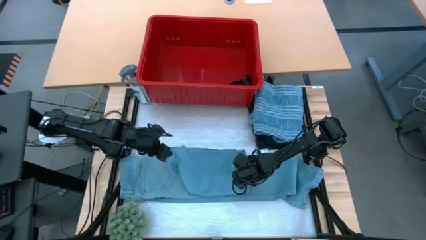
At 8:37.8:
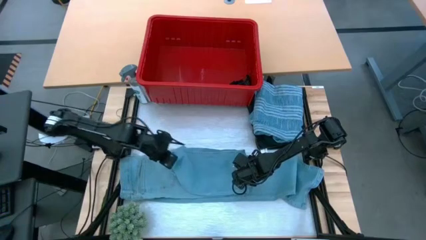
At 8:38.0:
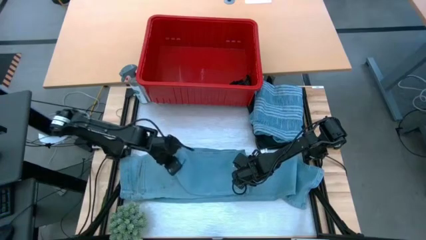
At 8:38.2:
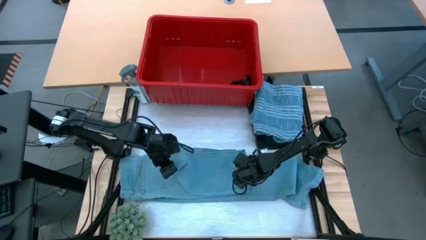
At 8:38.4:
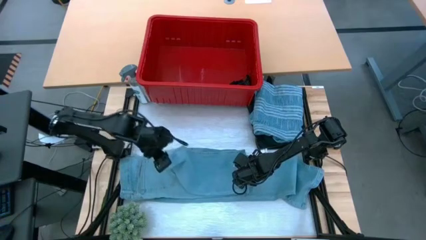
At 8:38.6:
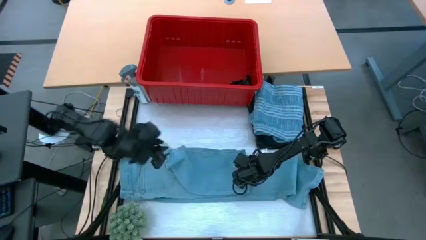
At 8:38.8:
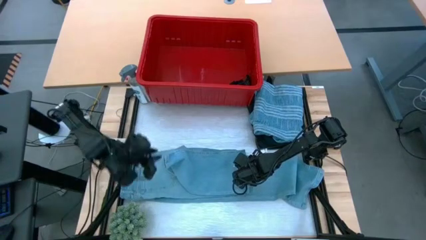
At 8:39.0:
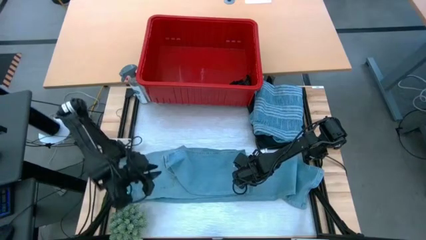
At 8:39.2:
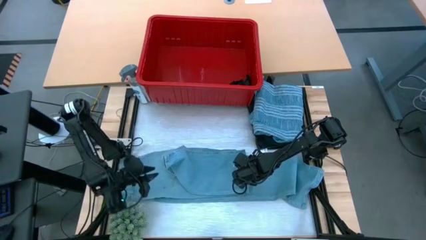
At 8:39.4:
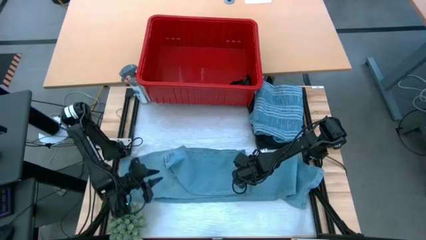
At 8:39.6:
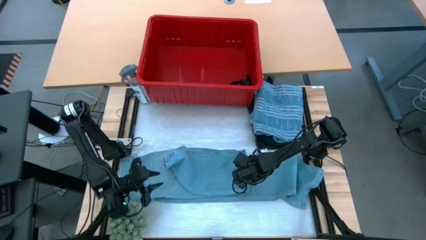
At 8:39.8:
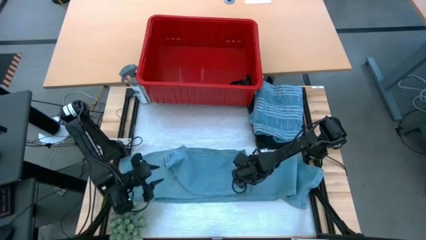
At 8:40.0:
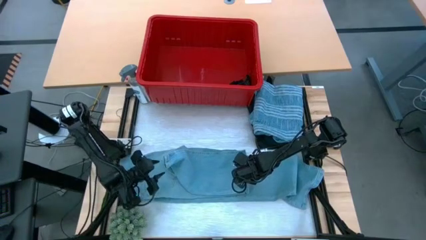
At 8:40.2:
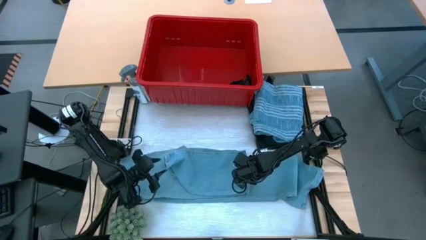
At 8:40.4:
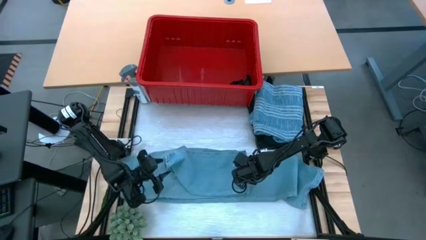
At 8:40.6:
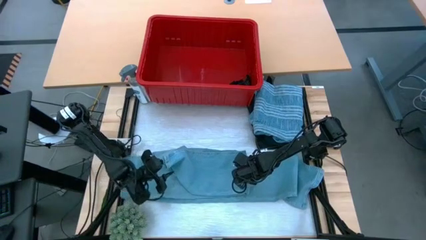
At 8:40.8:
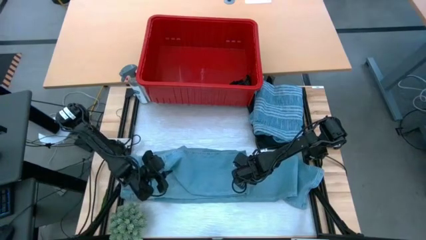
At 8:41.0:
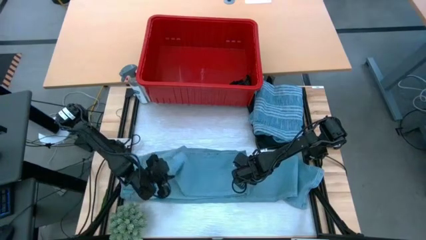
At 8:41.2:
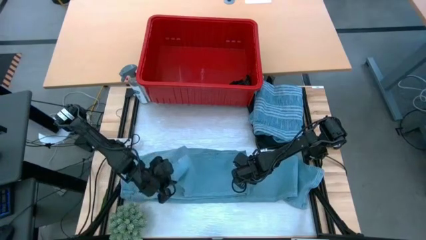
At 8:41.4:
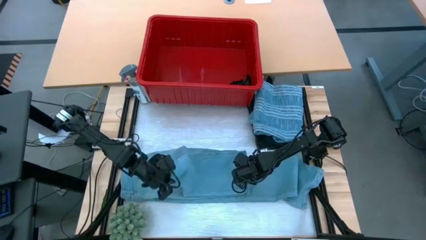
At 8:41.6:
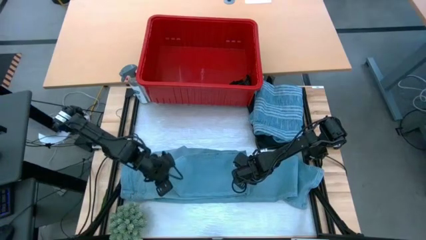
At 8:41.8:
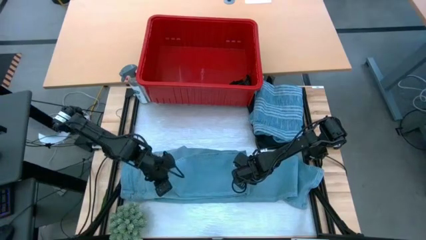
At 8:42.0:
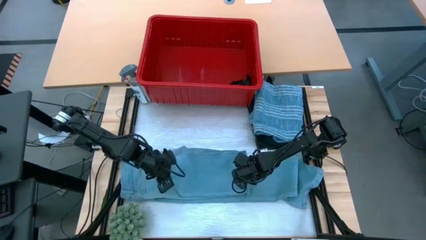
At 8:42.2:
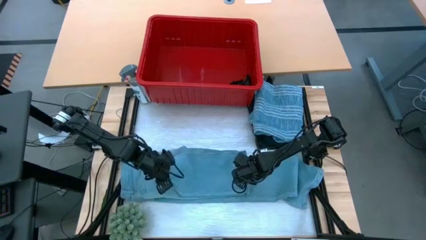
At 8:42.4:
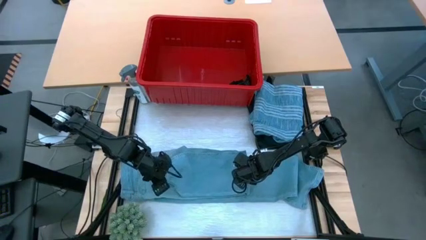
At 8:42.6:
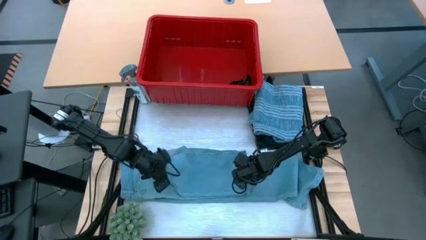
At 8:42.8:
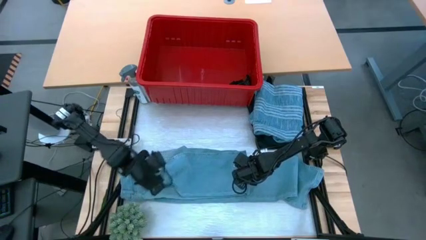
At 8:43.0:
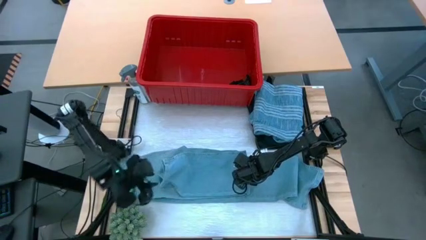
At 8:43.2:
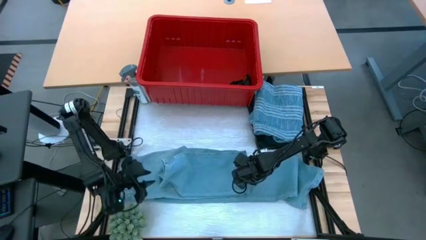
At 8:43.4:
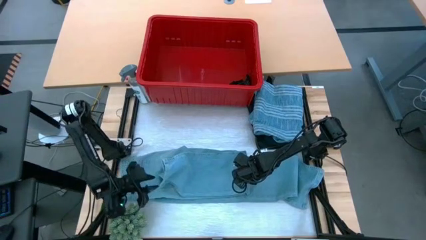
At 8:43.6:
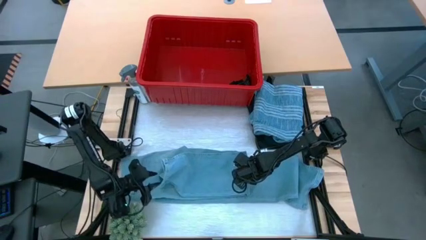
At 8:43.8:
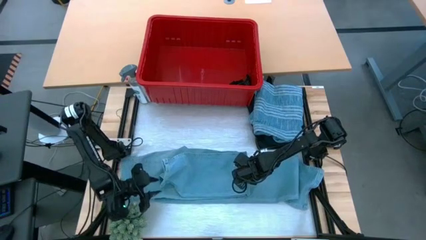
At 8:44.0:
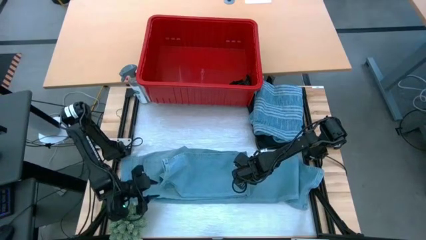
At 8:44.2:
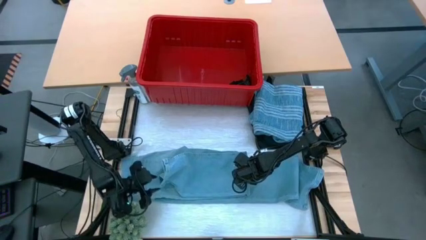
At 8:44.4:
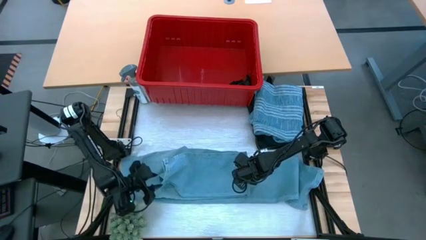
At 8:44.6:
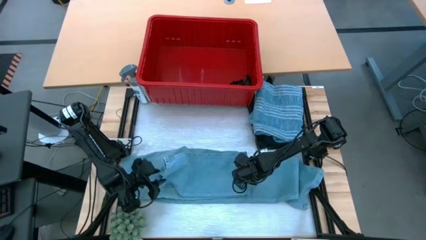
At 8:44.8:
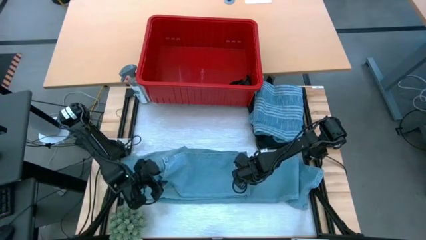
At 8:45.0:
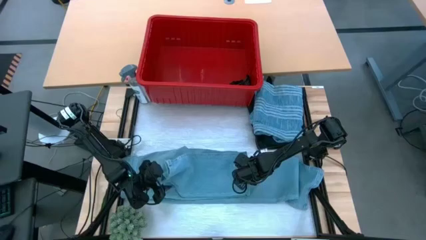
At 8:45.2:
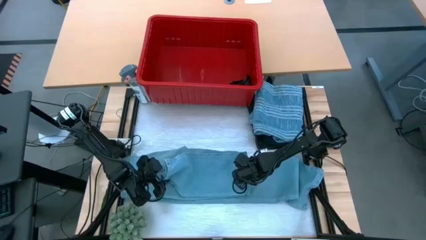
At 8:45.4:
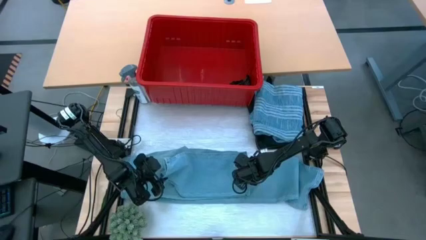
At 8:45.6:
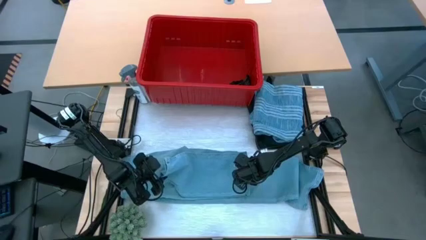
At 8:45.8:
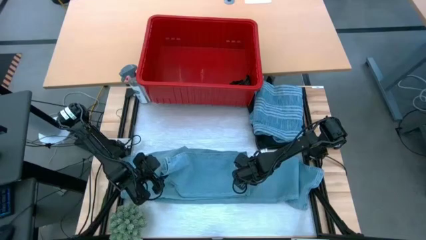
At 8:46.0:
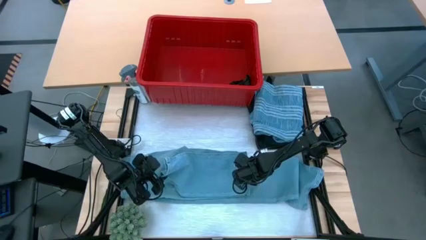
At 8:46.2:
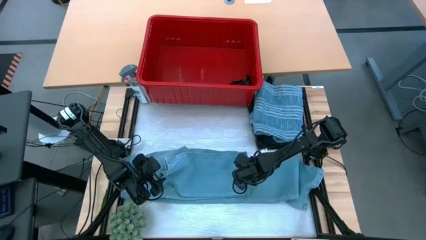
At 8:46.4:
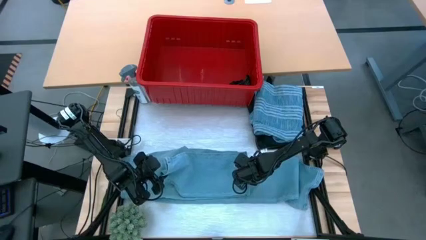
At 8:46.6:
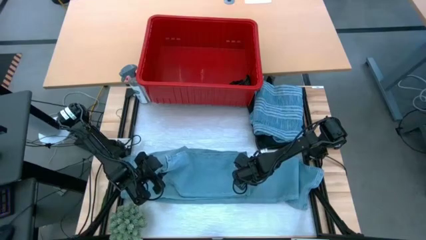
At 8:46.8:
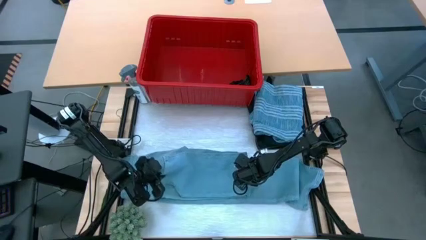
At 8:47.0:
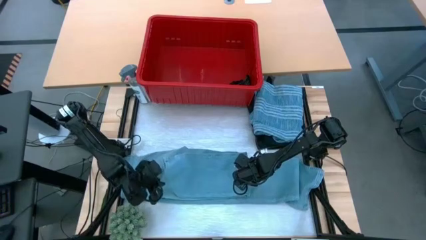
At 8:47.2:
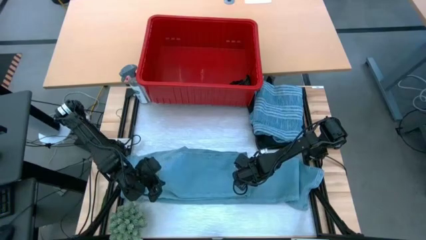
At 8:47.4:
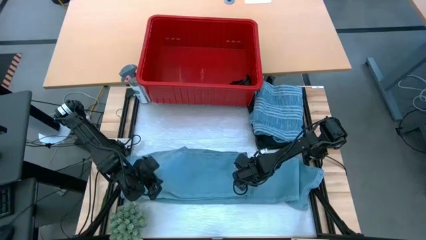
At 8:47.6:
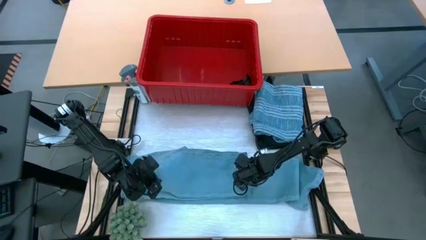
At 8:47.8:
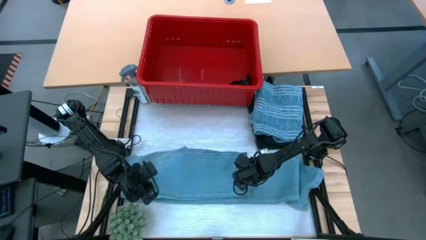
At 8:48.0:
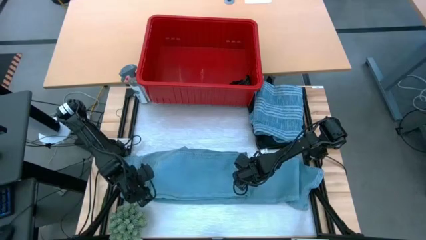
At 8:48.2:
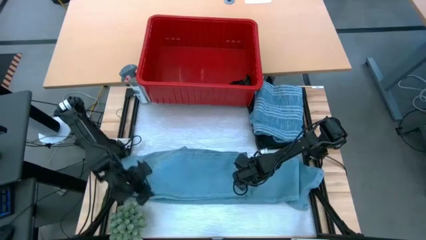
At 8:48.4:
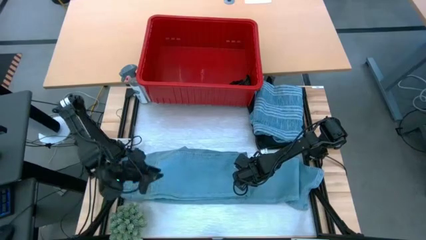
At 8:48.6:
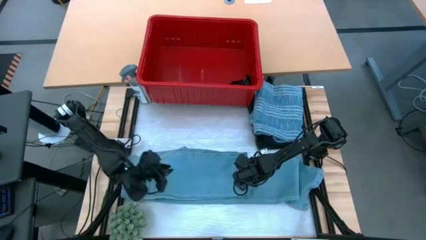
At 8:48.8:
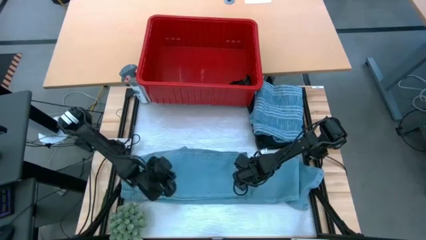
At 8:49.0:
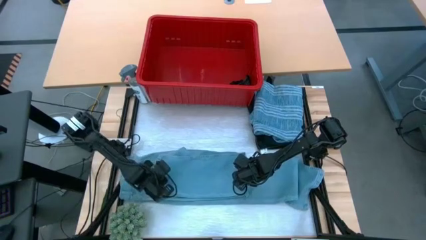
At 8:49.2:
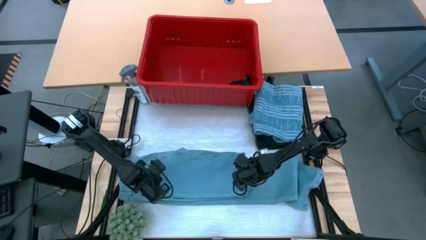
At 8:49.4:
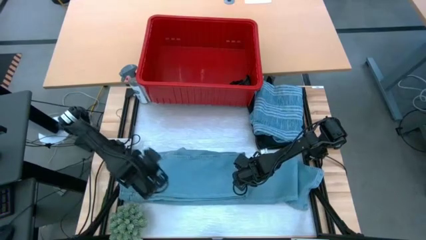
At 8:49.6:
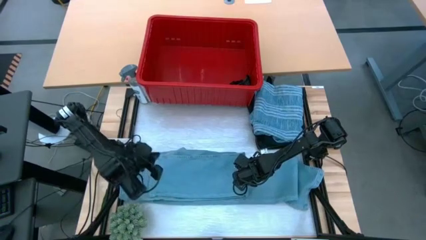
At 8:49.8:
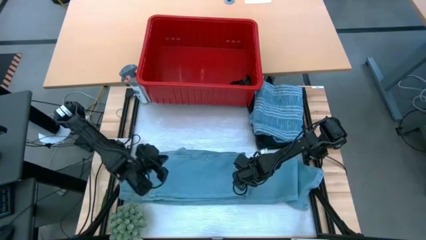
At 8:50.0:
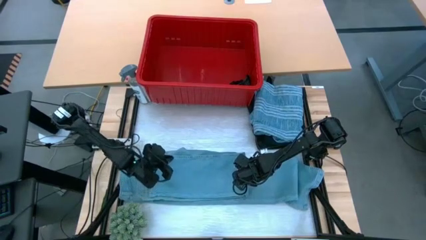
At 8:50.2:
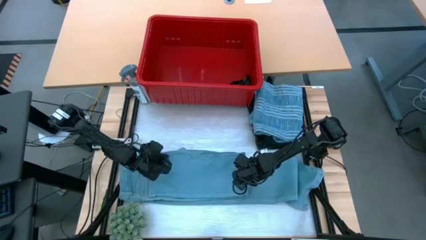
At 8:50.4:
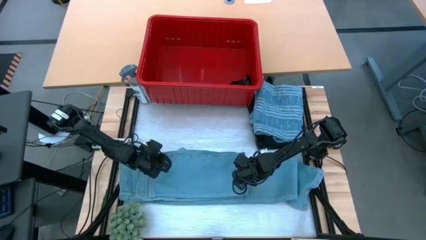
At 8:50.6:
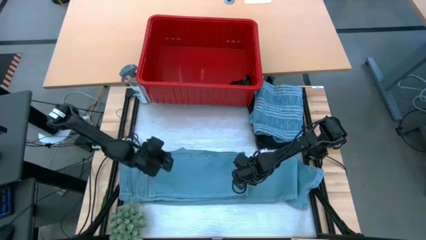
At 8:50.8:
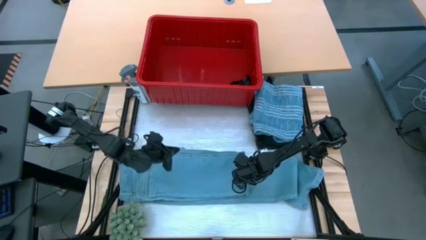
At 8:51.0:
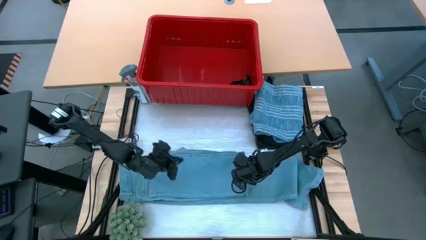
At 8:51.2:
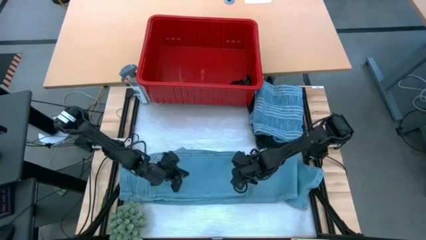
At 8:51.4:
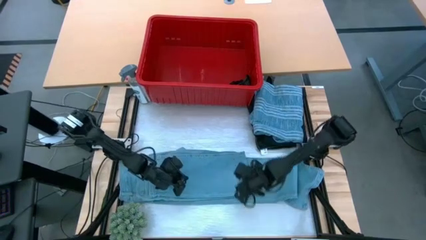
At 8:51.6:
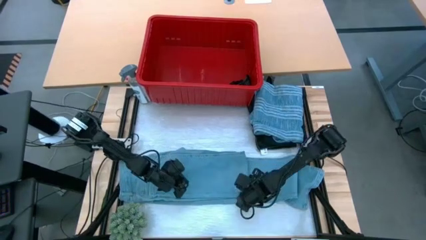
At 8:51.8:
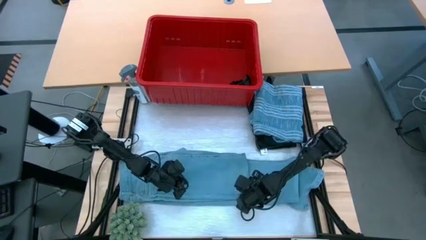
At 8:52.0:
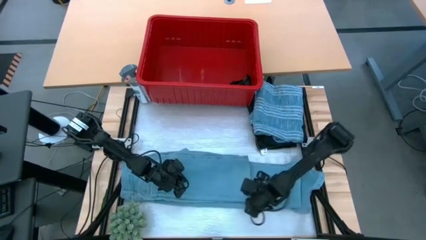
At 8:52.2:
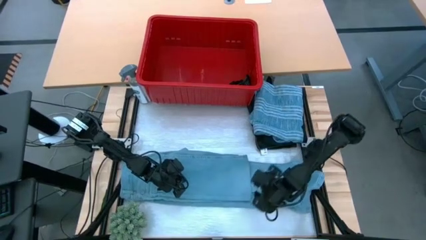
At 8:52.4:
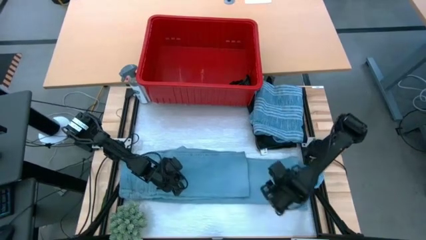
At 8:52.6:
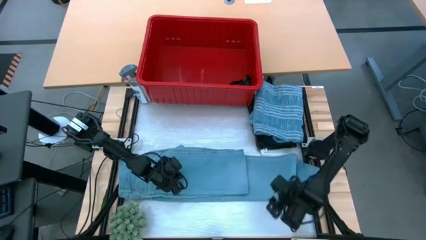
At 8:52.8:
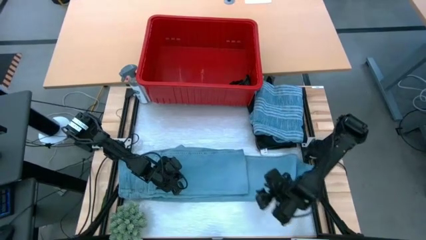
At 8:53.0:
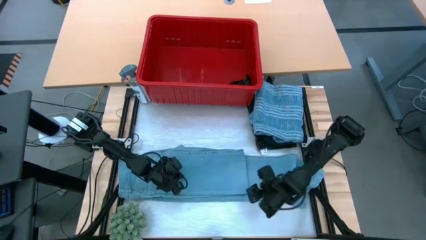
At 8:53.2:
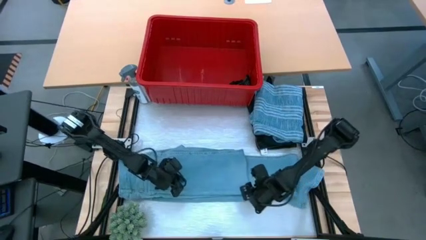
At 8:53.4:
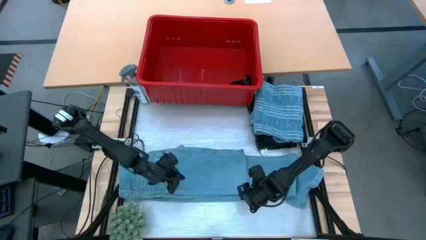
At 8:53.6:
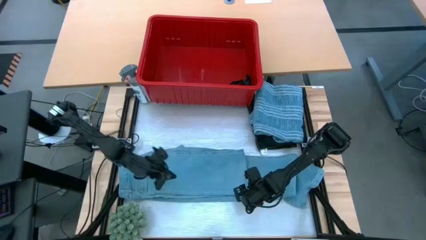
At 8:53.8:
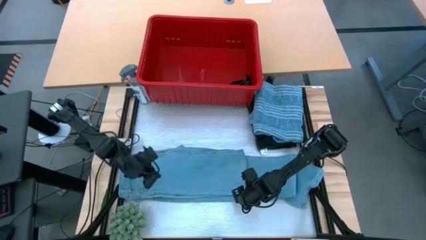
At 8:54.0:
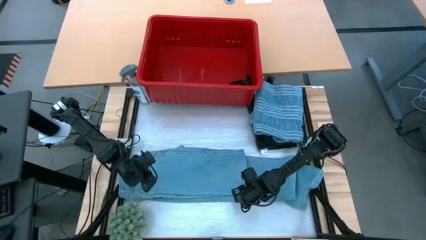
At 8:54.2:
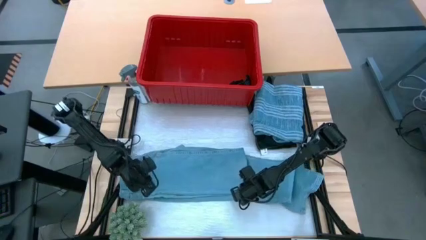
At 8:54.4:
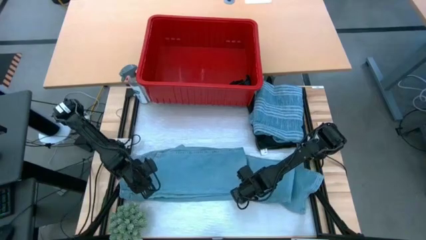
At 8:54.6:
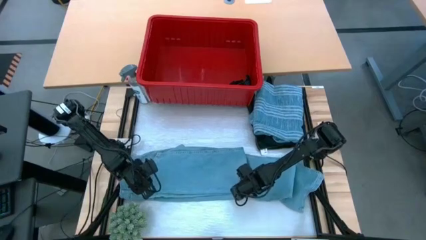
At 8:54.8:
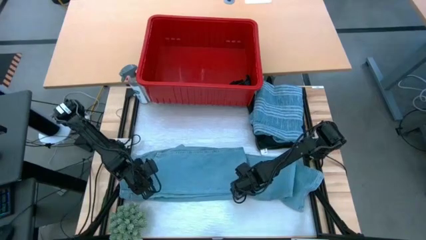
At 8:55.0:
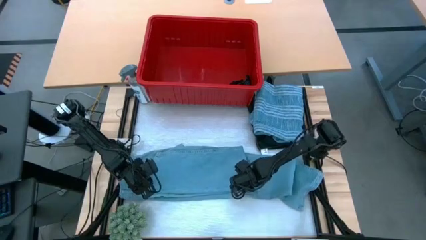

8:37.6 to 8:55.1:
Task: Fold Laundry from Bin
Fold the light blue pants
